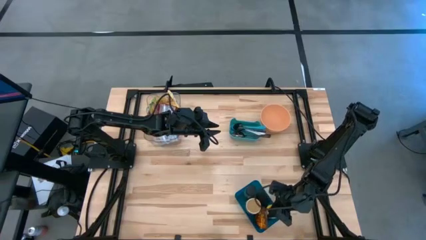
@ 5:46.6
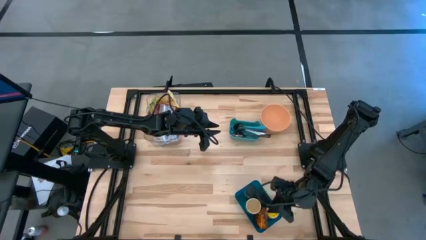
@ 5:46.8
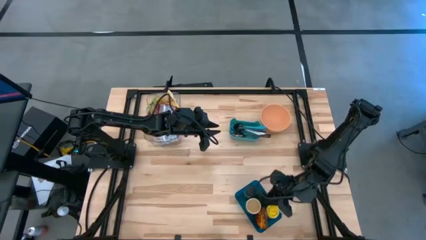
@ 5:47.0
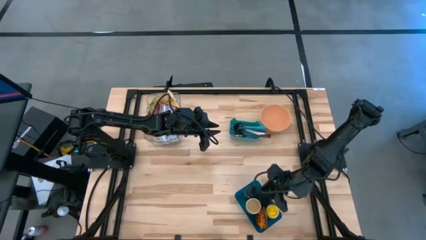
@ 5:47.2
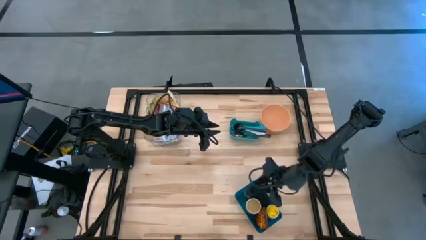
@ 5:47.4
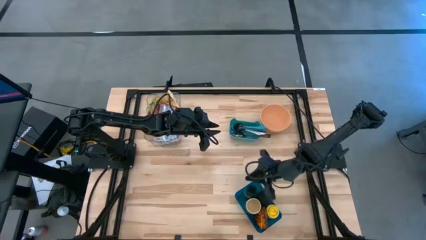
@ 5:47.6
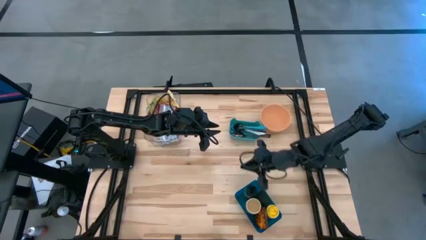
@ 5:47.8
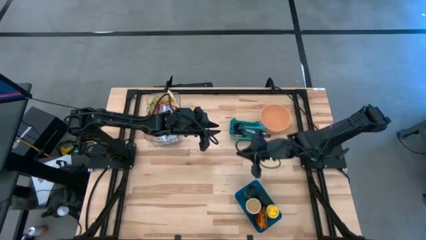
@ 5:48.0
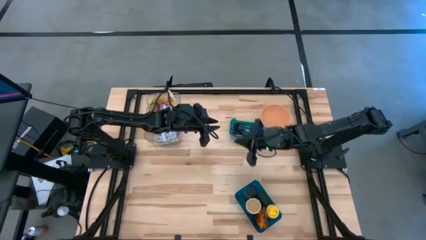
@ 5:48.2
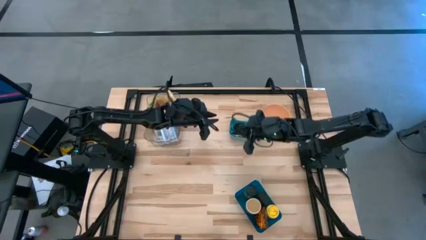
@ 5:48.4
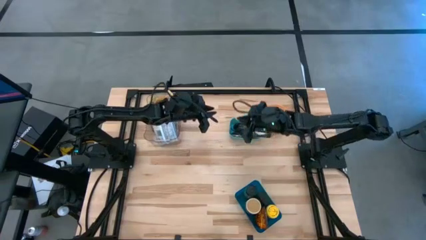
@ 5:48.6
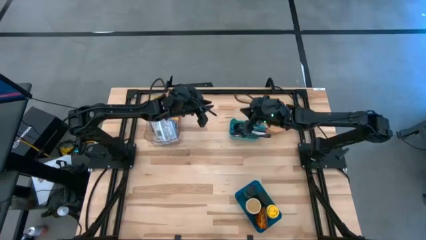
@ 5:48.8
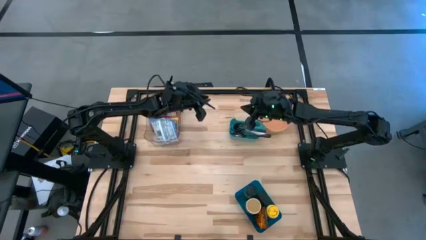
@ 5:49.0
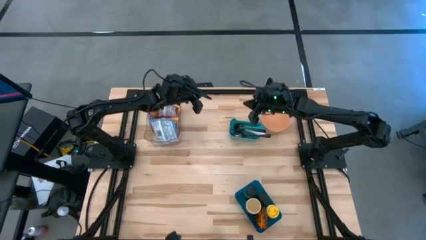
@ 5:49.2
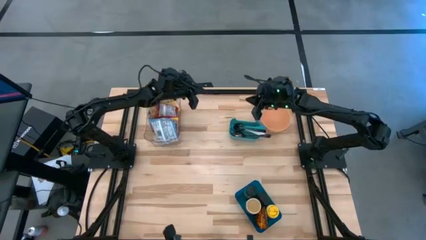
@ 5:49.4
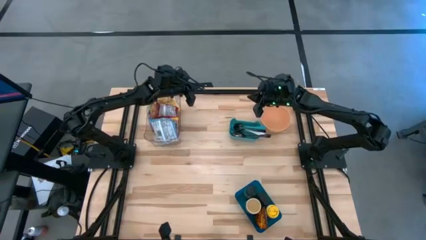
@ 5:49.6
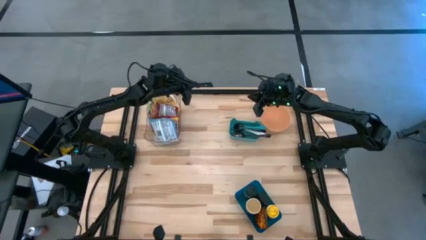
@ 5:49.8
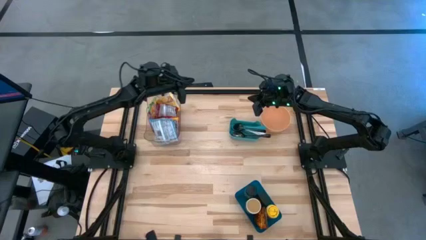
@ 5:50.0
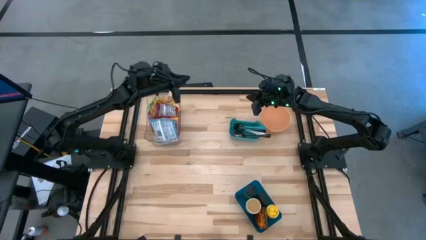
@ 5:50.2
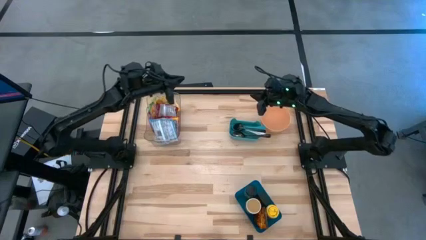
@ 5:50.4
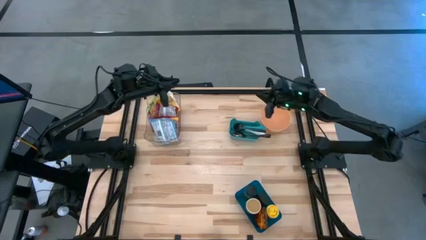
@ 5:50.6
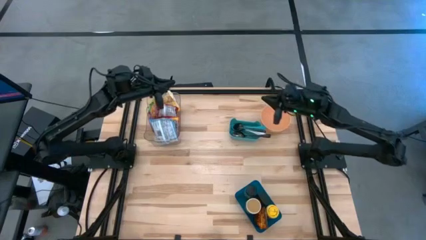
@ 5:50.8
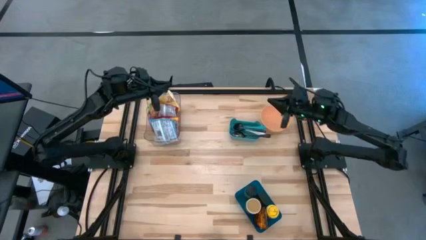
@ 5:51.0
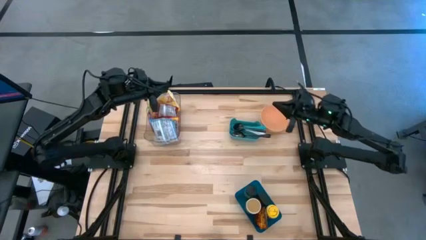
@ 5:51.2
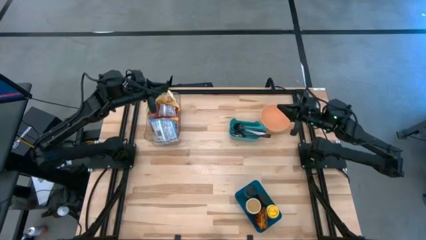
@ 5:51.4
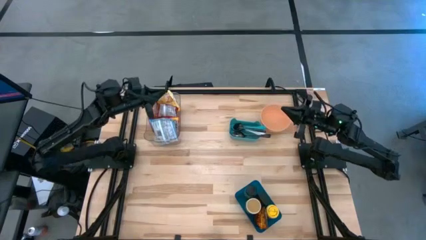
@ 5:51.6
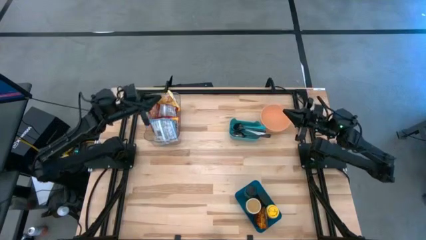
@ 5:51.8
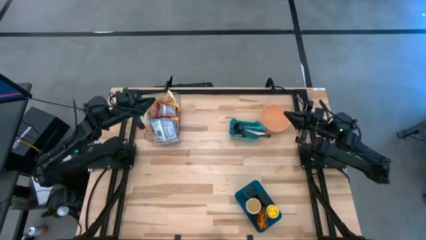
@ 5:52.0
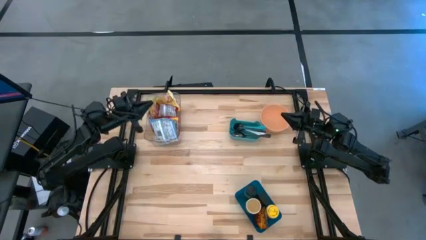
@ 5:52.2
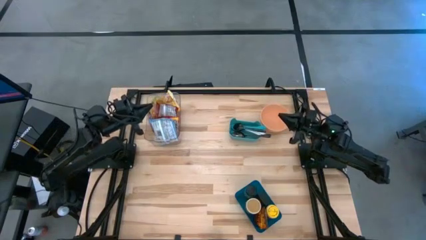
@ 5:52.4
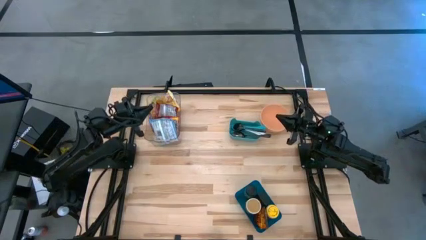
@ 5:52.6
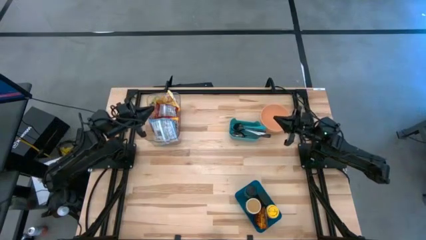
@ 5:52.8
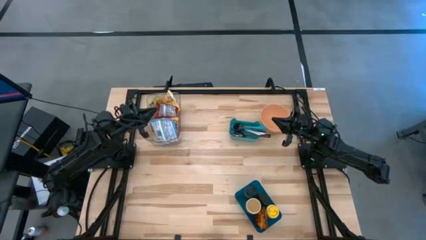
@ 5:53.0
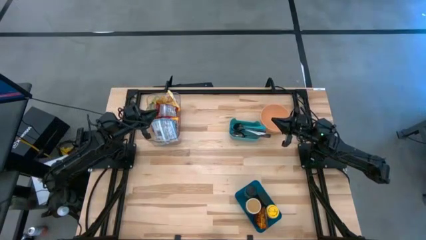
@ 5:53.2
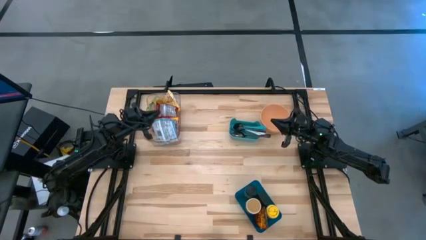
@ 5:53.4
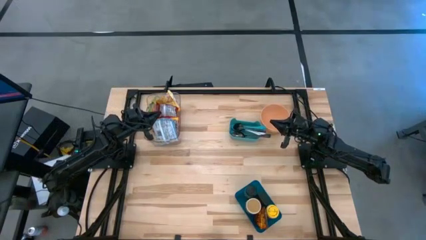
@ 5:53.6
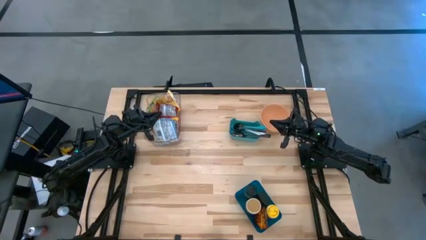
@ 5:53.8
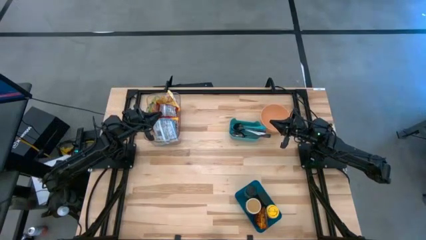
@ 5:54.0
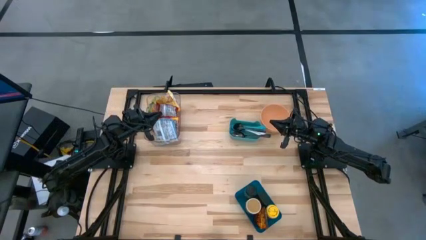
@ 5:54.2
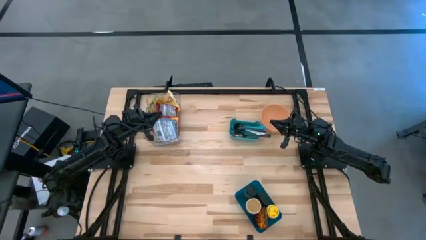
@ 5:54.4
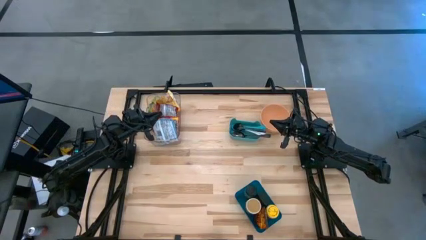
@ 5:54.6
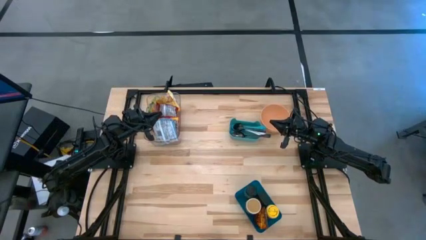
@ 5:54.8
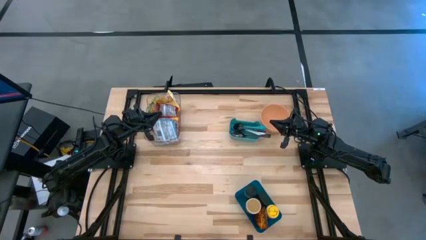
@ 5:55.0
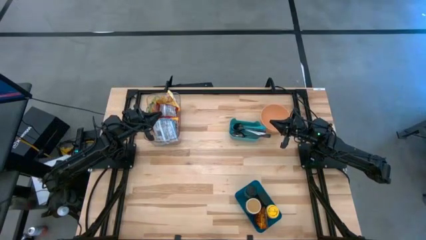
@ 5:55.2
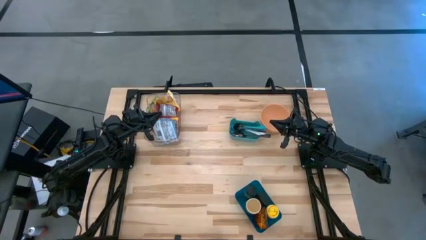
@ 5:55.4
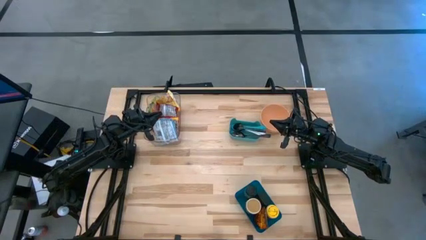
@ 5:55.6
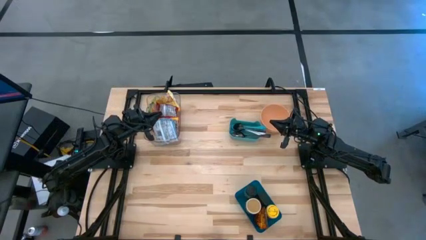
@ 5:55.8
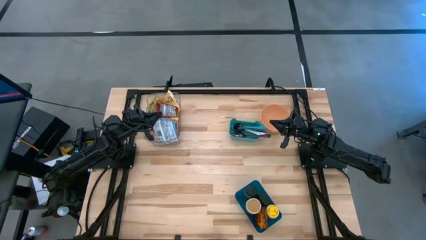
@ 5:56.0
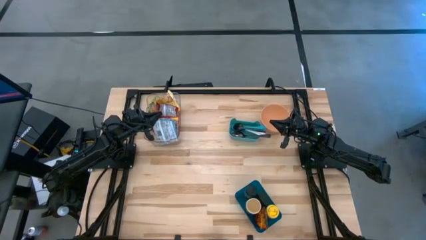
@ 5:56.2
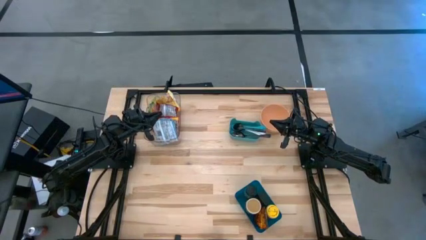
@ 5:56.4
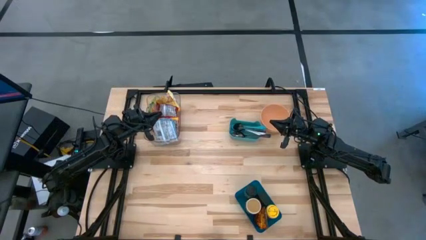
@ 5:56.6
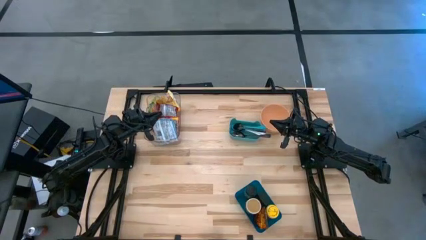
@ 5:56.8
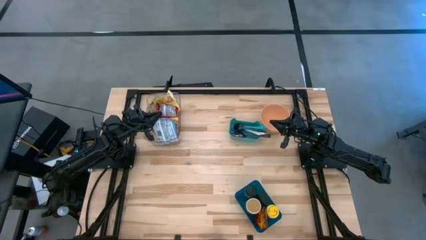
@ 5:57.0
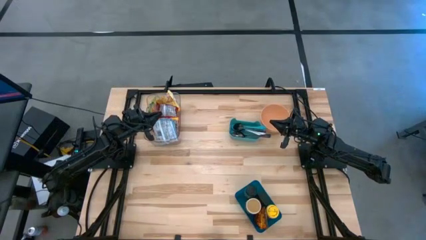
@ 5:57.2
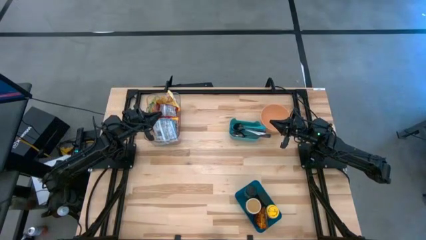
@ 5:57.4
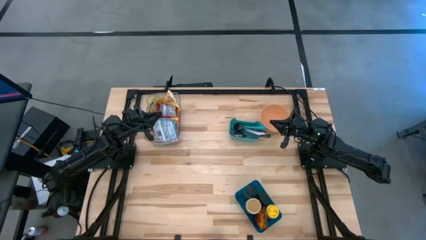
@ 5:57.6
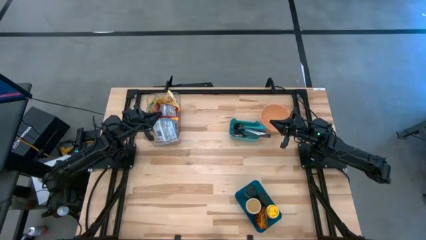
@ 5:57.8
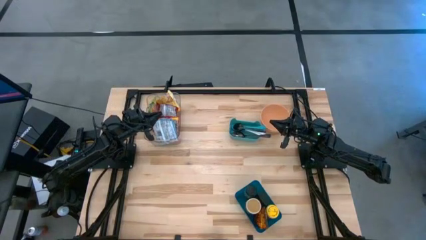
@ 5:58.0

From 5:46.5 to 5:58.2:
Task: Pick & Place Food Item
Return to Home Position

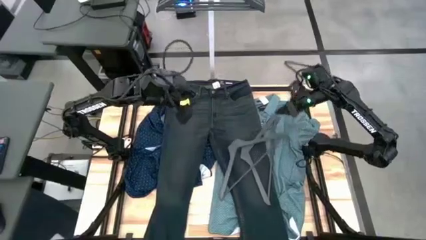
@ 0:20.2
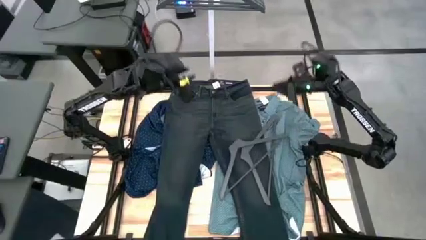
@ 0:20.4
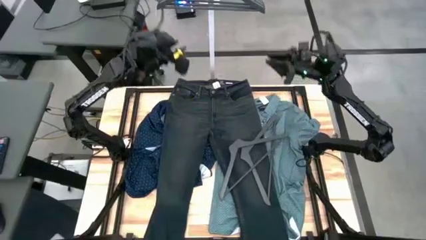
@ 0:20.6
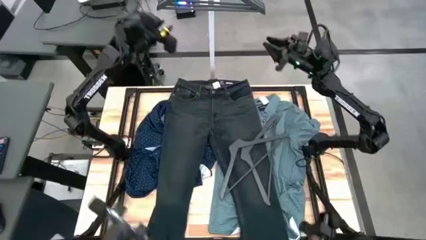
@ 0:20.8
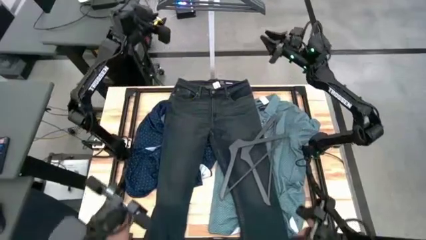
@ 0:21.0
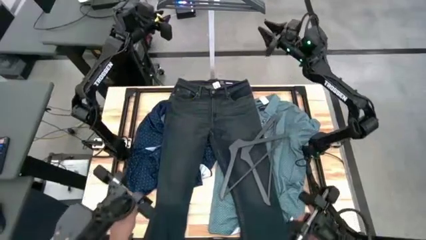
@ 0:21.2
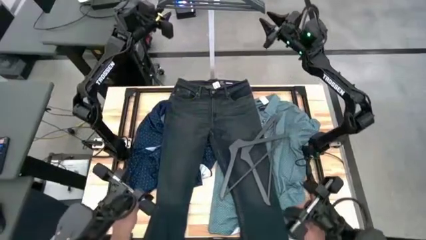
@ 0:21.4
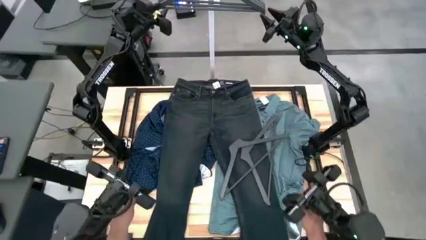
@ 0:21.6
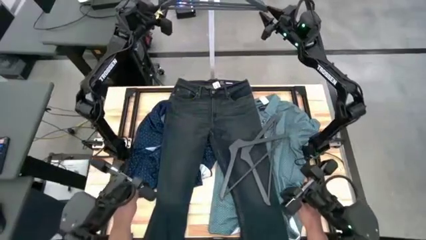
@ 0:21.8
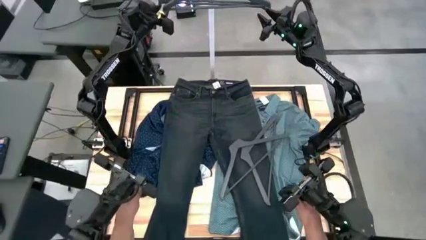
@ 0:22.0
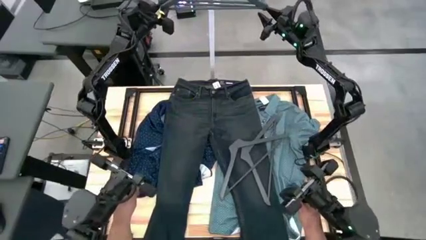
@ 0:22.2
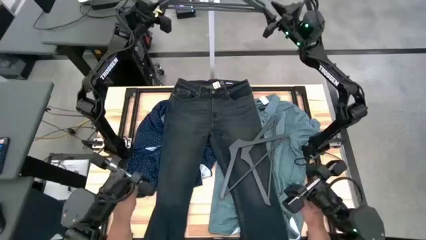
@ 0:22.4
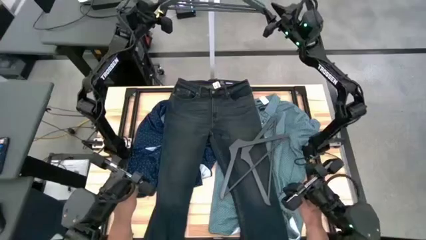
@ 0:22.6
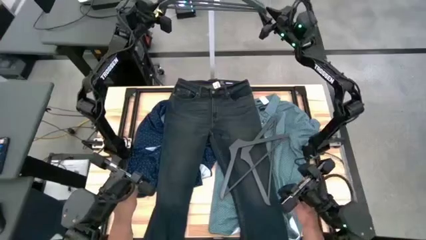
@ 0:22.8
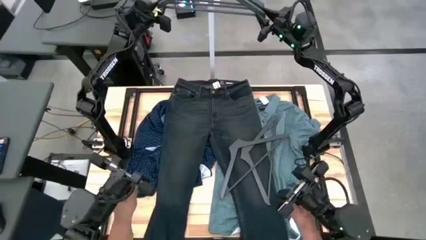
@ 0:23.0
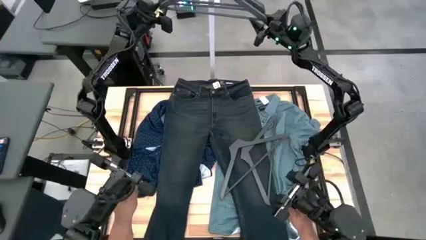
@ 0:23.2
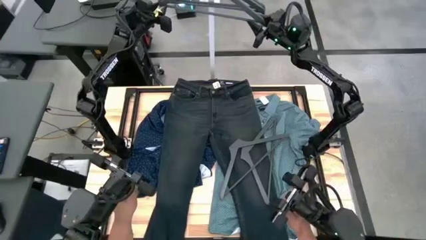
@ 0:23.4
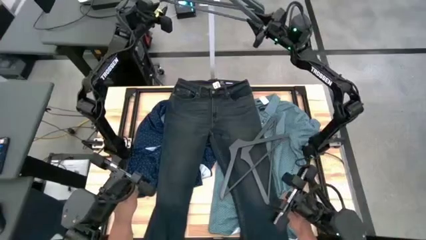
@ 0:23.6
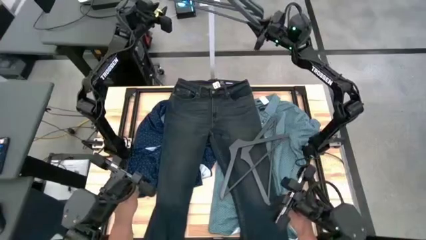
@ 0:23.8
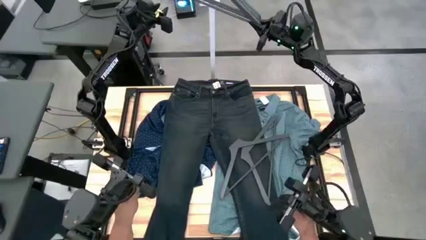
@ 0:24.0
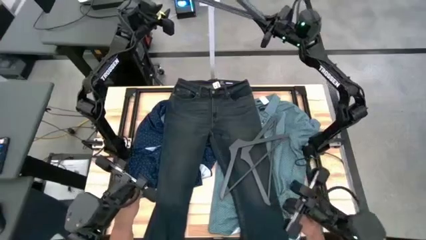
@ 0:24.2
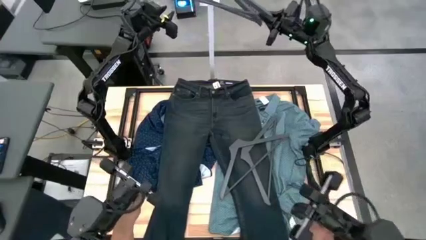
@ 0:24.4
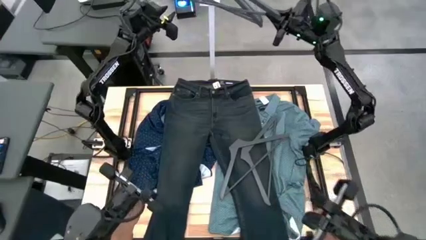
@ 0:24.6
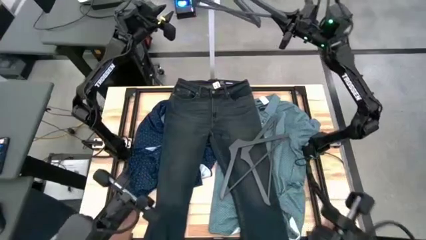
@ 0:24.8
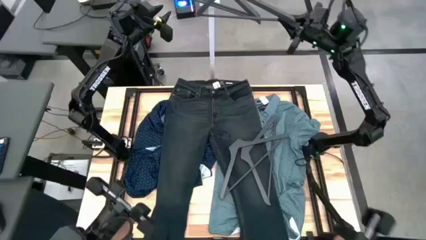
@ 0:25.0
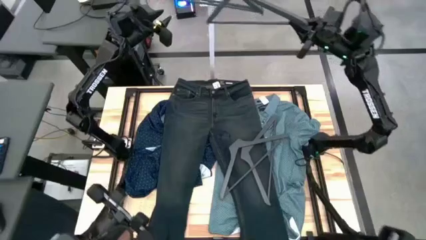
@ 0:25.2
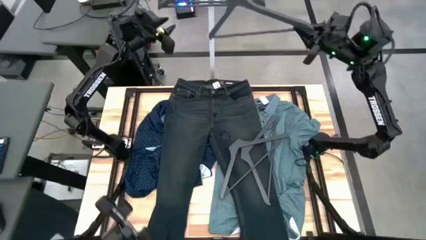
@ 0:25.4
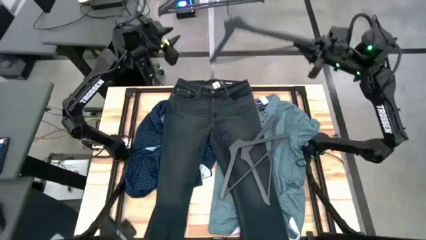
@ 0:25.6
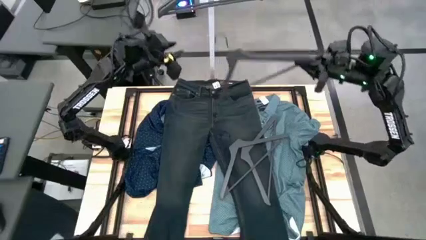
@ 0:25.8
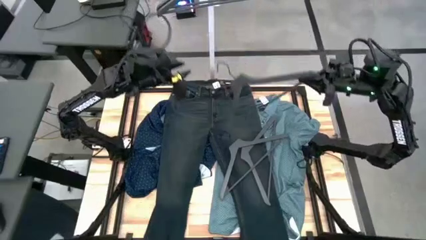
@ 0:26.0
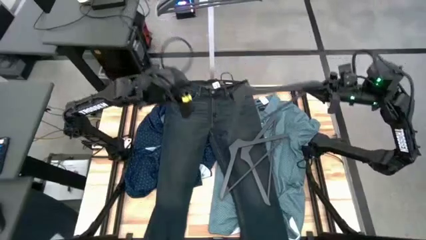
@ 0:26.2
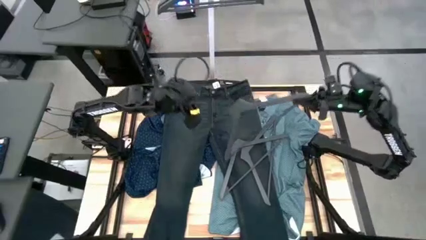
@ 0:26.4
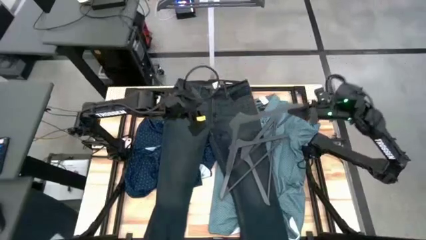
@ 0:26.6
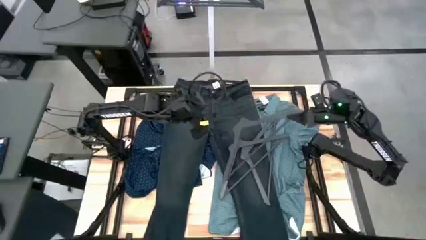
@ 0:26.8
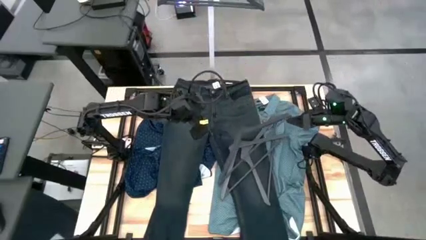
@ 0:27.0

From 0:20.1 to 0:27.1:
Task: Hang clothes
Remove the gray hanger from the rack
